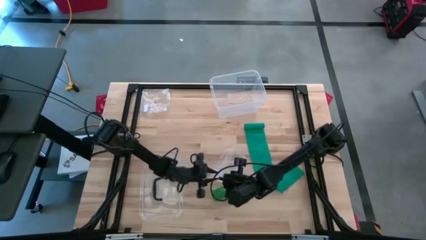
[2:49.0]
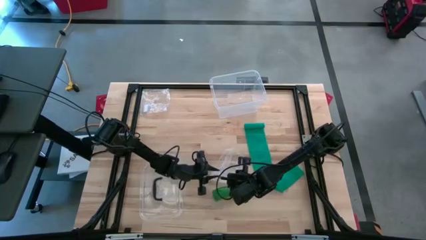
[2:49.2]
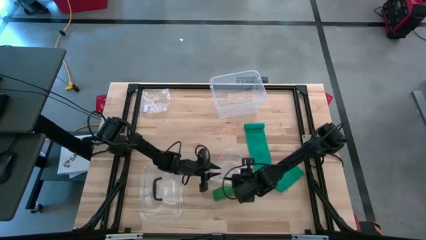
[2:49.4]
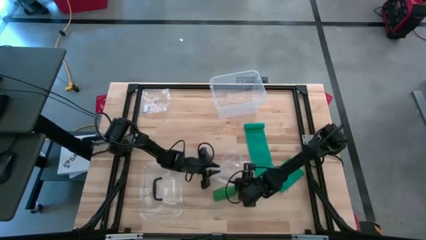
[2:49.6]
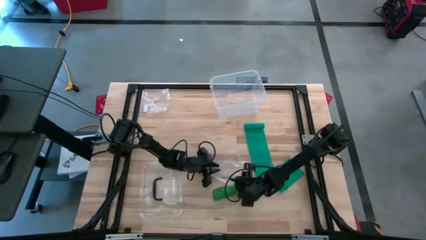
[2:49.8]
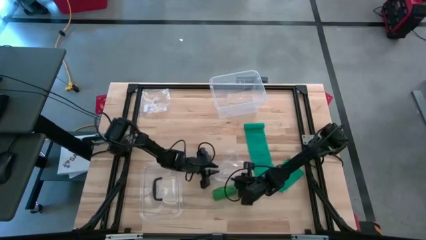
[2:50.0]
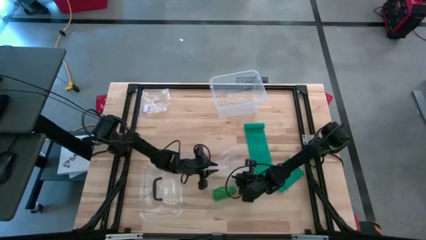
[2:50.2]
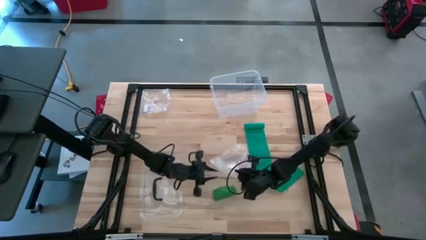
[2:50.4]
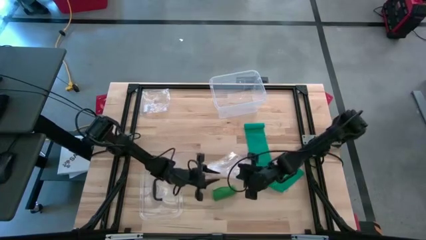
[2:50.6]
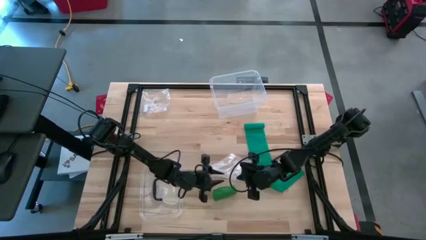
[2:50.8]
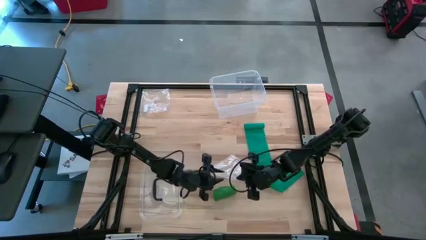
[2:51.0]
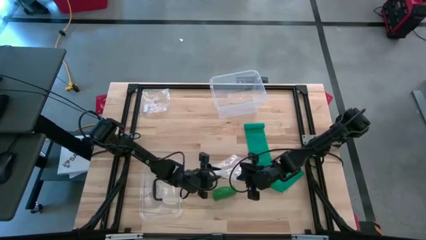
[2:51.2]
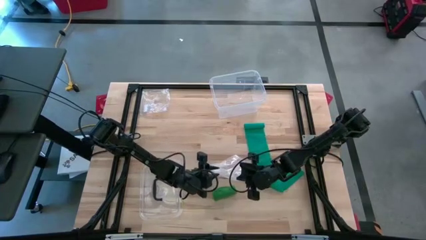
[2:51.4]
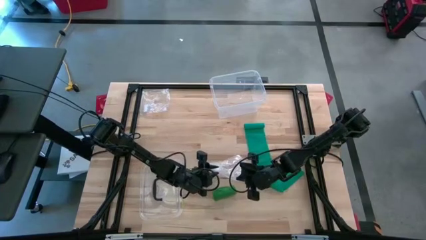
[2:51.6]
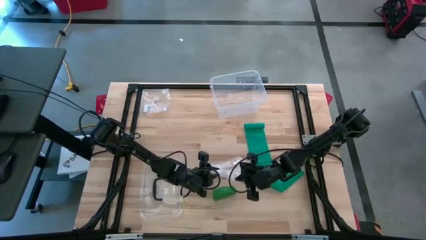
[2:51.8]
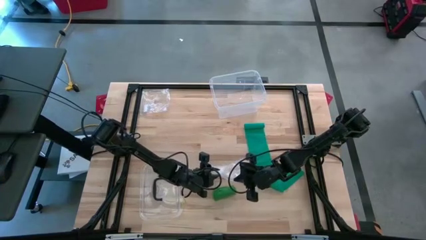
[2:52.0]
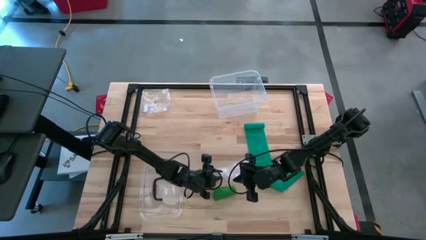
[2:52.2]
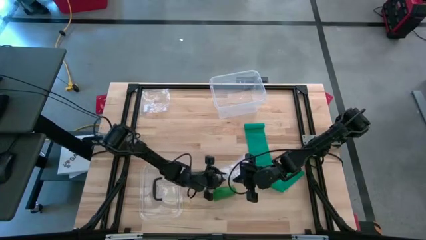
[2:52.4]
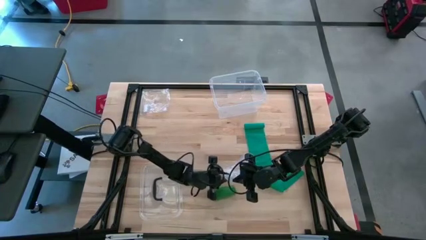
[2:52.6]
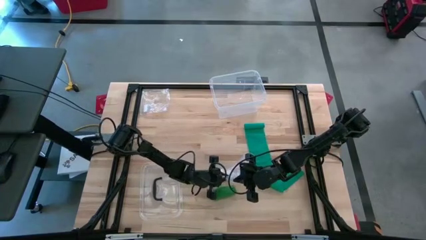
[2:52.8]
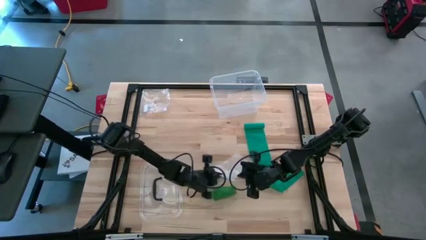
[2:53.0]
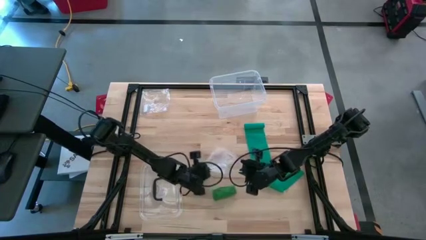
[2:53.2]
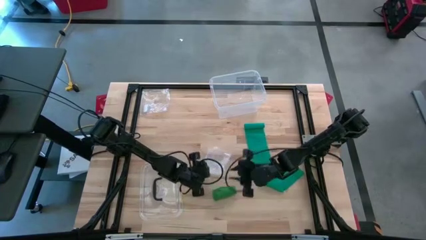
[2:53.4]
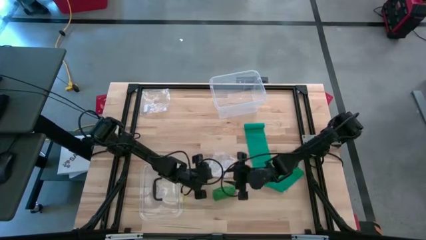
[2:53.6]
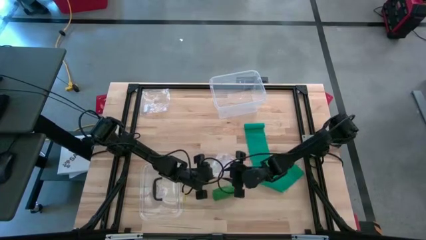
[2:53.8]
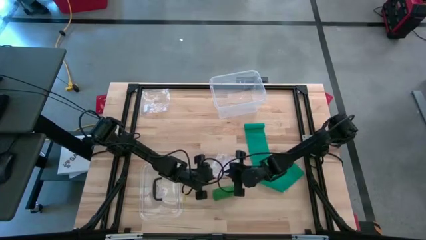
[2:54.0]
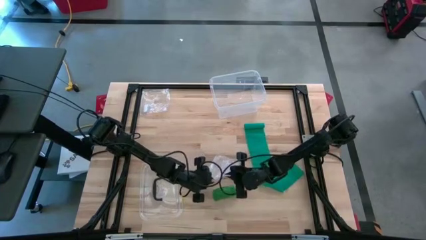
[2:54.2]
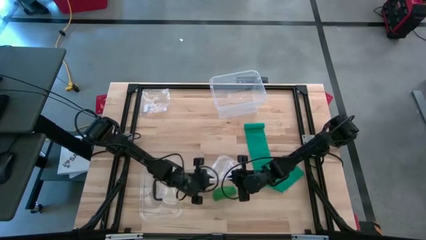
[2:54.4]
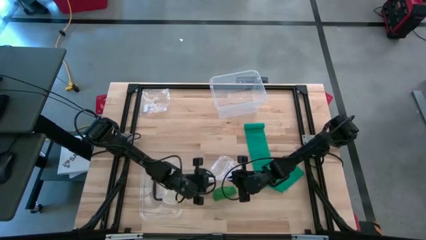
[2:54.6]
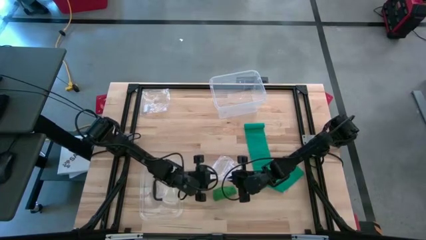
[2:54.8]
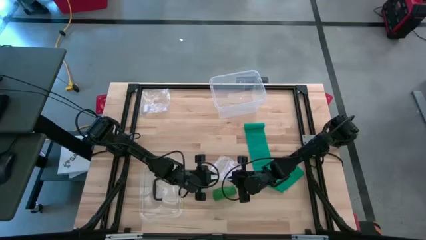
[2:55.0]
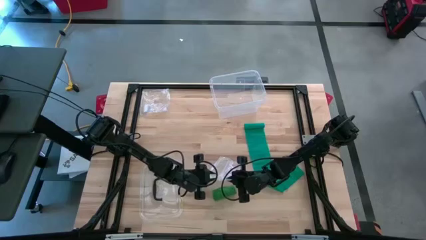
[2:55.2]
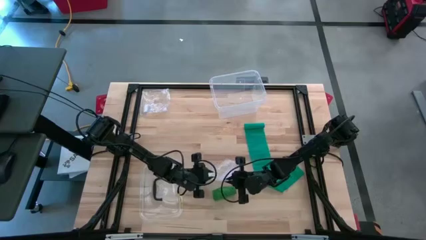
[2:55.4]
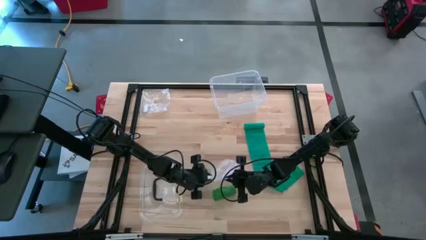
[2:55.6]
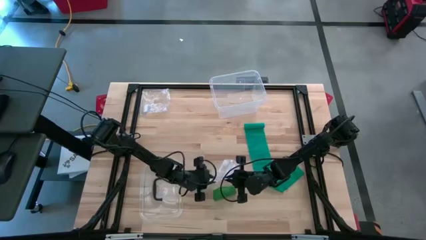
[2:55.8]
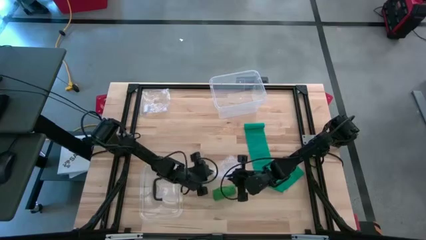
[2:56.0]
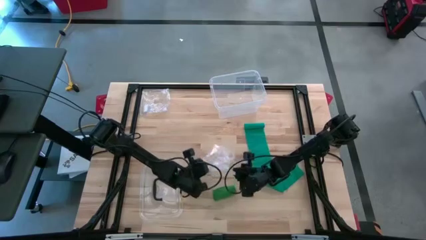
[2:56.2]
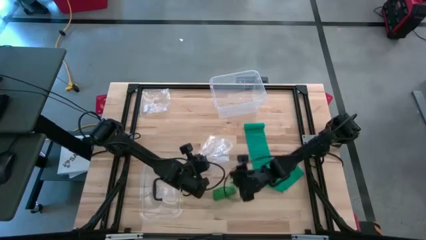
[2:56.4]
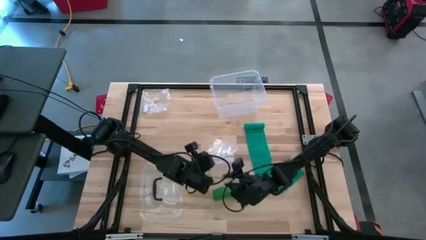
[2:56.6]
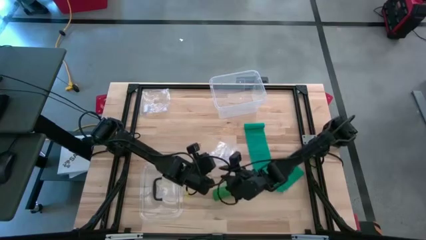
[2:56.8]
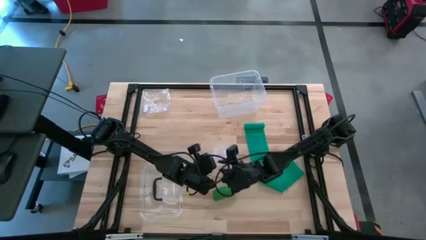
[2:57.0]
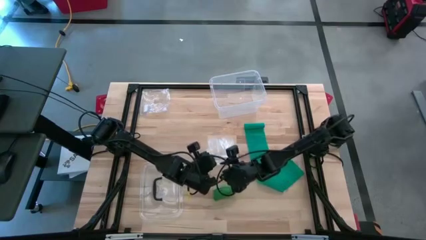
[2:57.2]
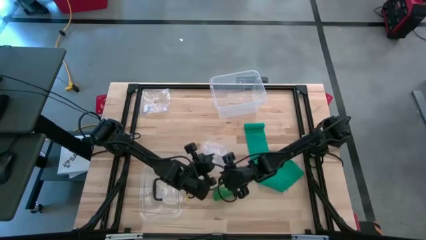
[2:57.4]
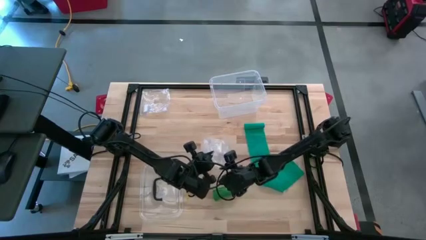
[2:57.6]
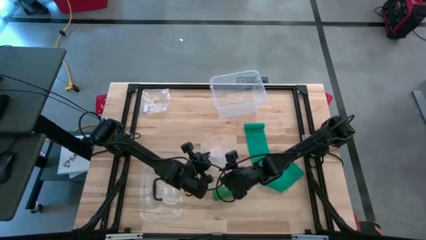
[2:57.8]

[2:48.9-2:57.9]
Task: Roll bandage
Open the transparent zip bag

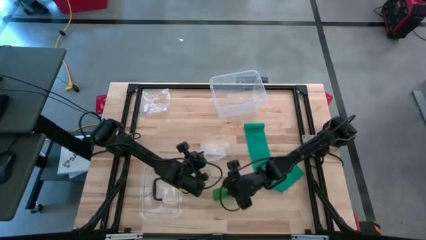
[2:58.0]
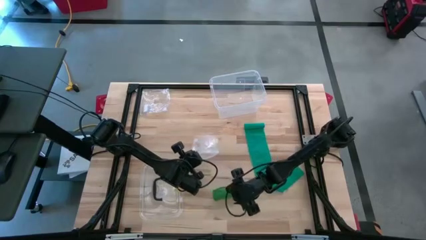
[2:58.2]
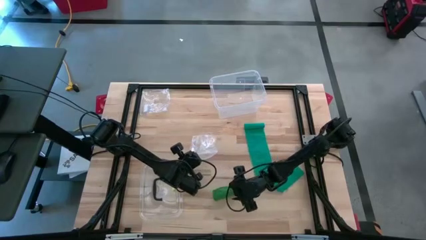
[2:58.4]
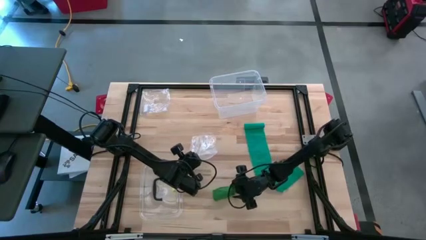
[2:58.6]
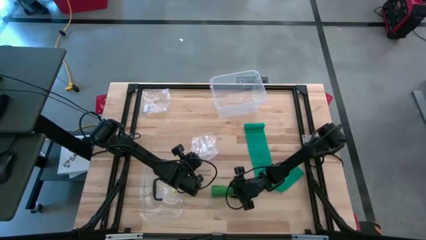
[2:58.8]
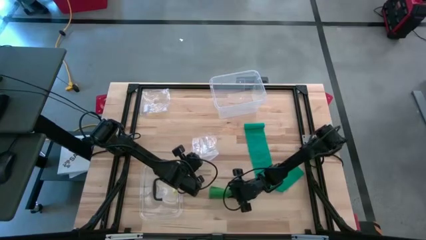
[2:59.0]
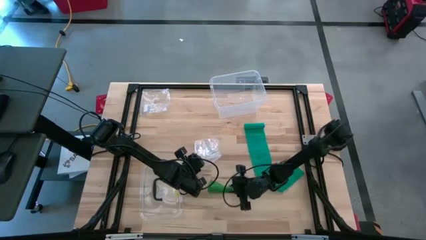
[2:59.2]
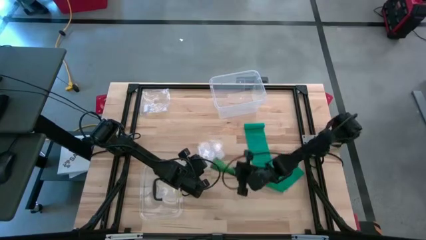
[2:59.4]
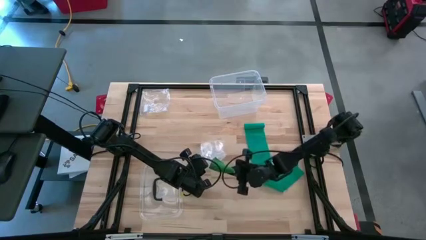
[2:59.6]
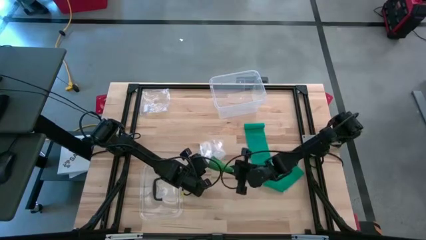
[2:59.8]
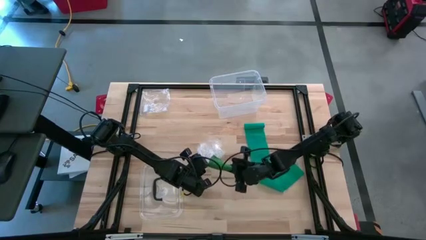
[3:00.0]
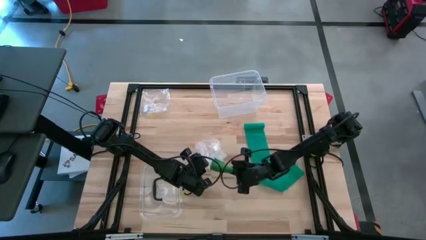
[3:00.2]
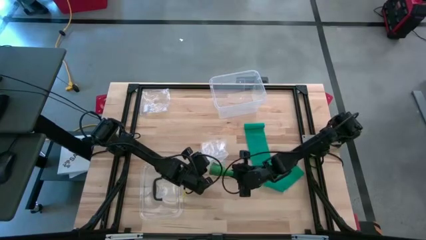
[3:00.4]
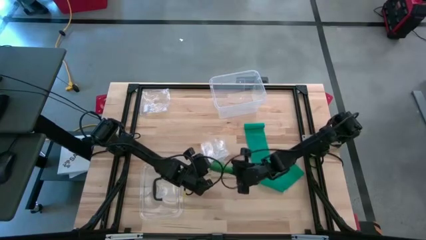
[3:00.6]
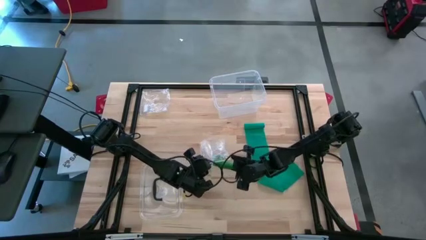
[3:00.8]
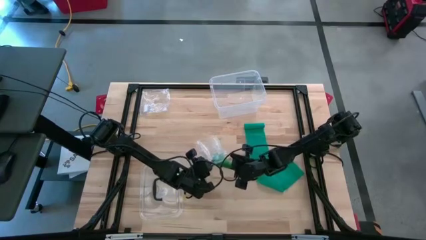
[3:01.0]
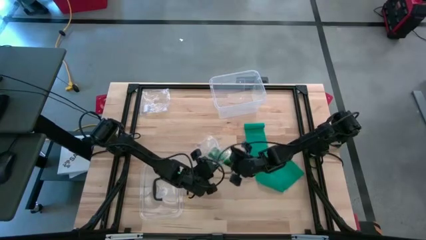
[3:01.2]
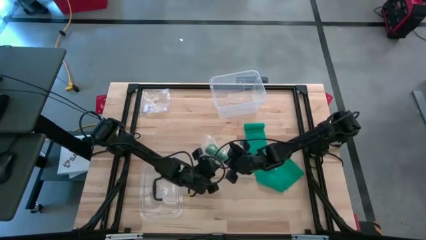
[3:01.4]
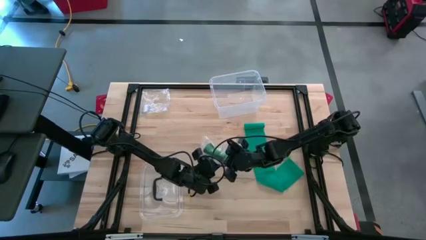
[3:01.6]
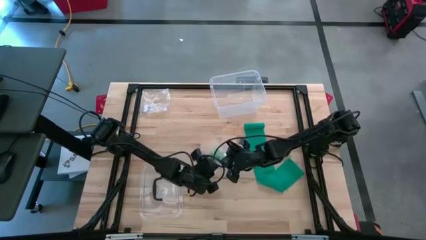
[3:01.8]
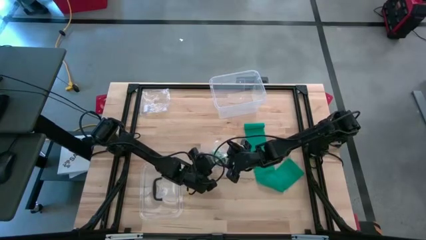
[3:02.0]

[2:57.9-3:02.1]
Put the rolled green bandage into the transparent zip bag

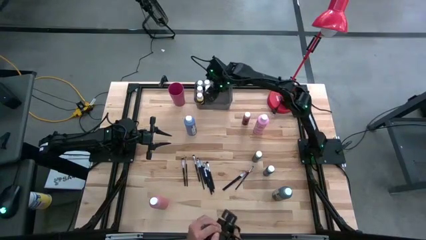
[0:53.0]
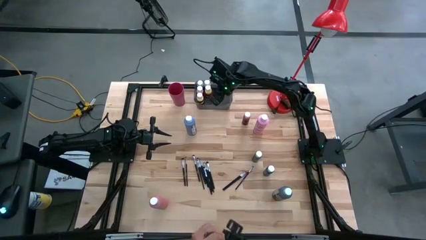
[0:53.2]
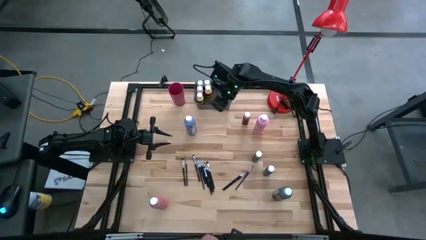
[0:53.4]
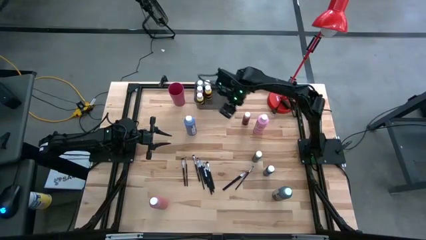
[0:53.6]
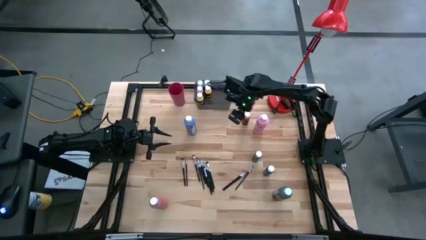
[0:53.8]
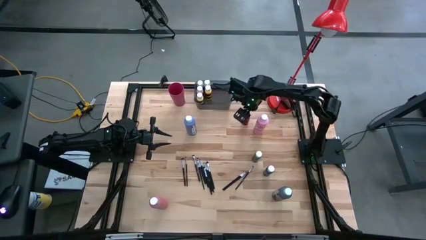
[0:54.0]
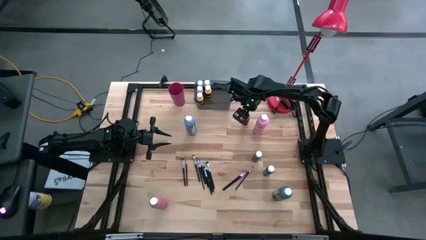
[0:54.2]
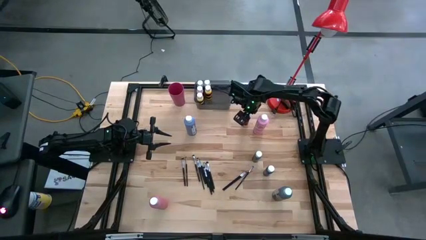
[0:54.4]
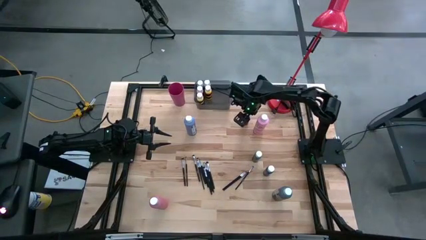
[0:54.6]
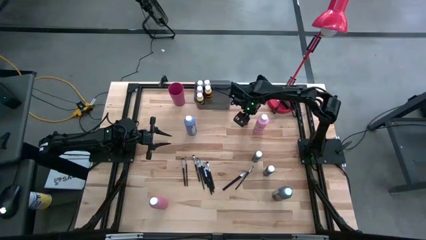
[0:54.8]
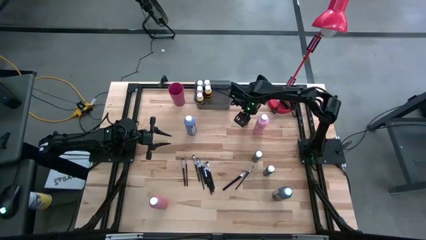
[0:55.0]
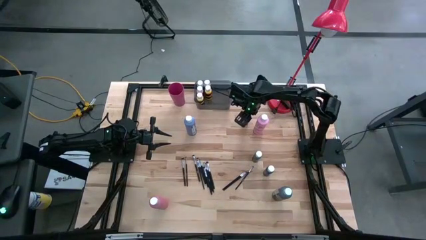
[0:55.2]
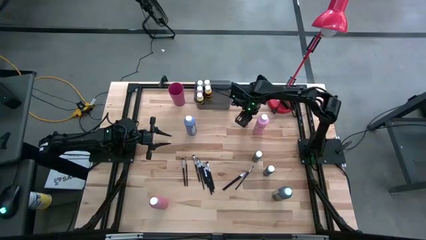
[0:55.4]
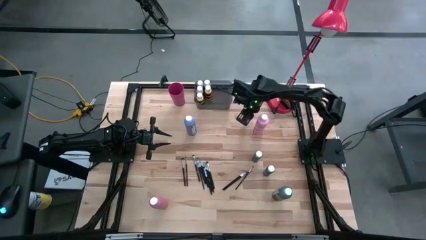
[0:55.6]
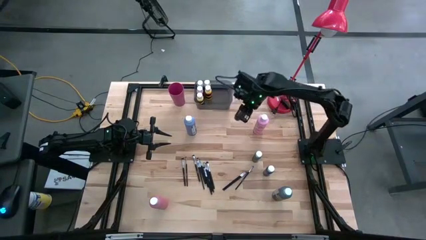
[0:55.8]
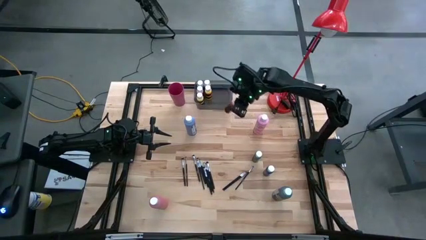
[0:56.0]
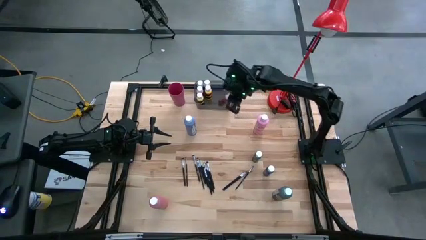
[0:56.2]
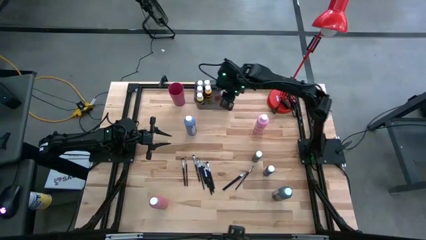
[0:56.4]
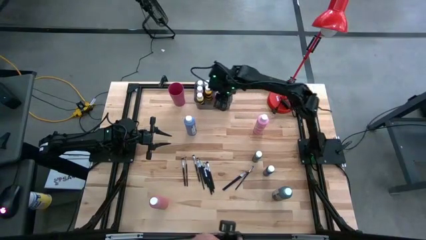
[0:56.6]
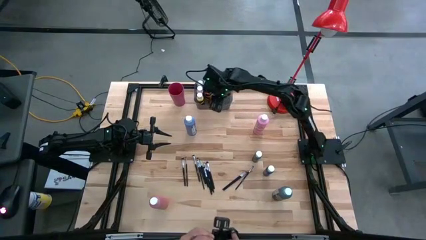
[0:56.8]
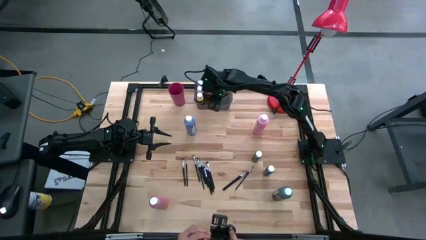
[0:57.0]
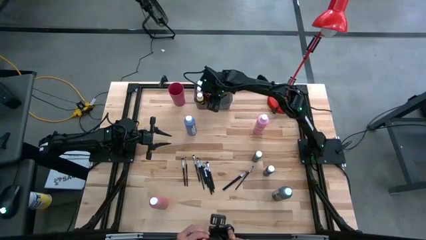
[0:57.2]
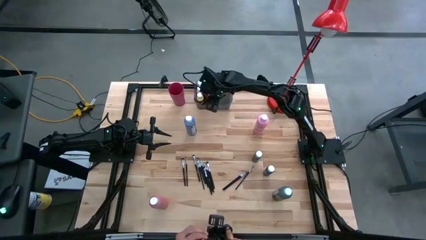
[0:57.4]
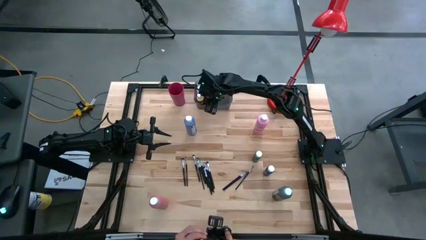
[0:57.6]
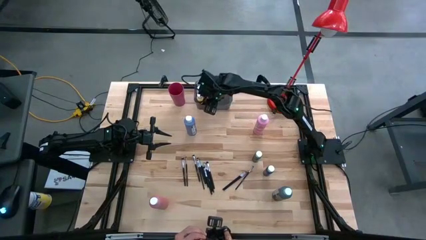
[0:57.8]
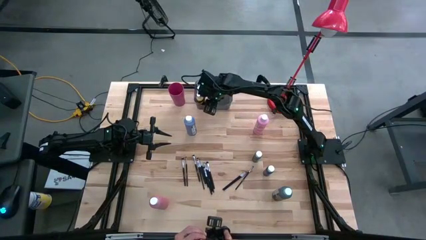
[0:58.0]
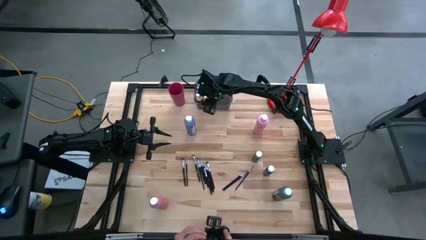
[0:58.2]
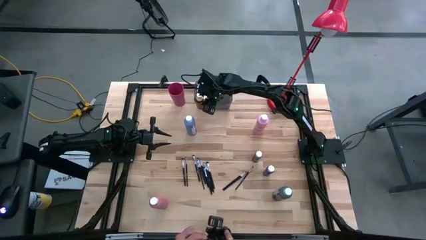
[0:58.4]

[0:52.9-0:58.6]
Task: Pick & Place Paint Supplies
Put the red paint bottle into the black bin
